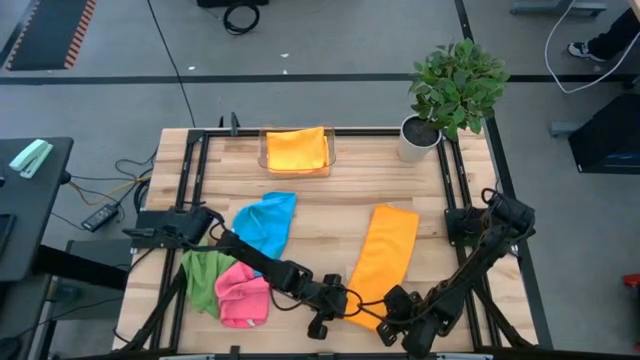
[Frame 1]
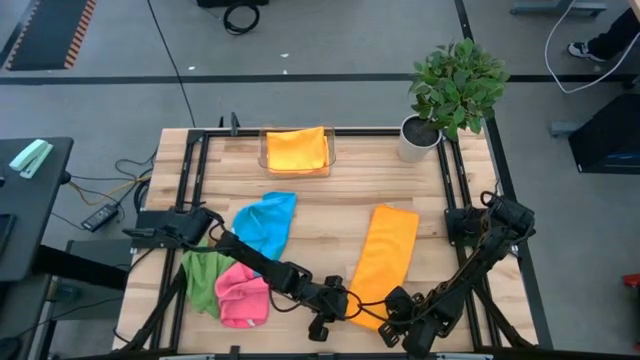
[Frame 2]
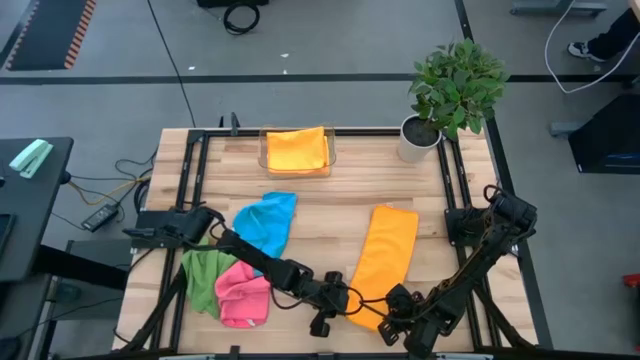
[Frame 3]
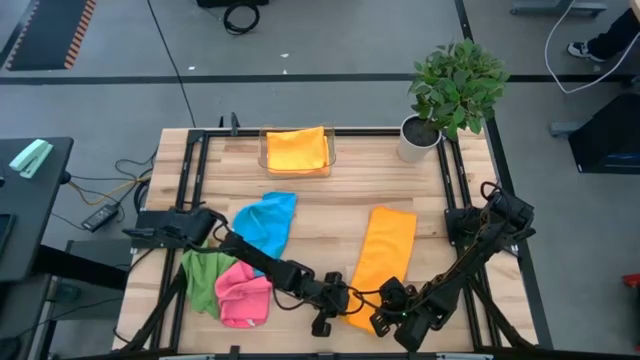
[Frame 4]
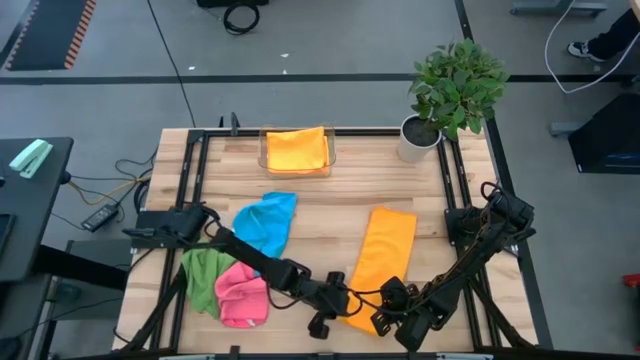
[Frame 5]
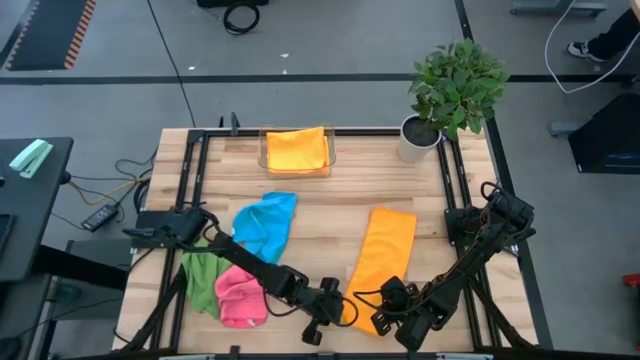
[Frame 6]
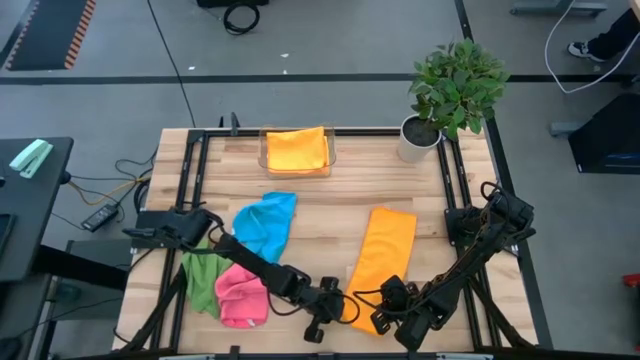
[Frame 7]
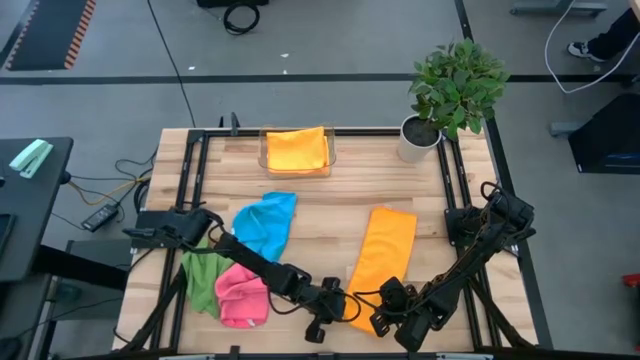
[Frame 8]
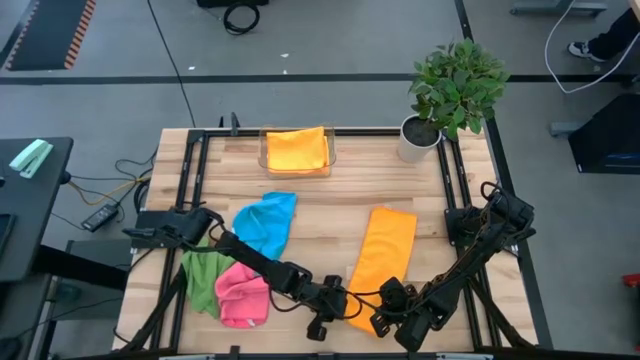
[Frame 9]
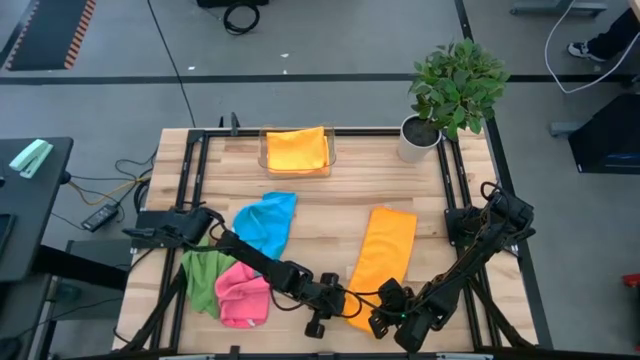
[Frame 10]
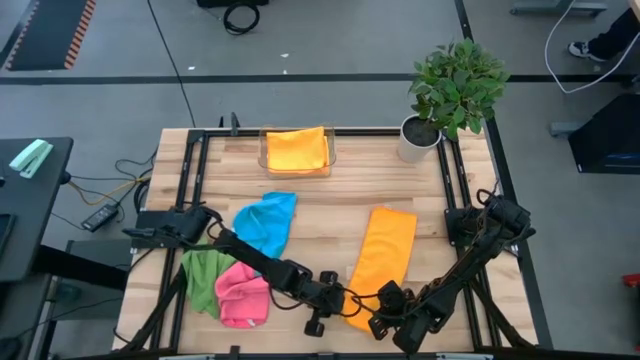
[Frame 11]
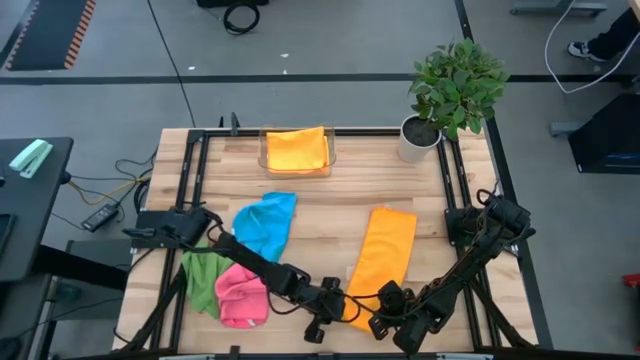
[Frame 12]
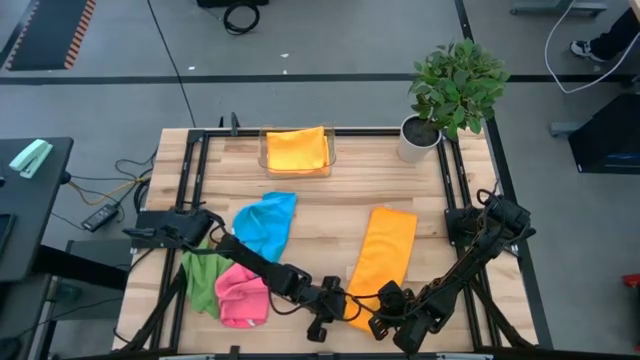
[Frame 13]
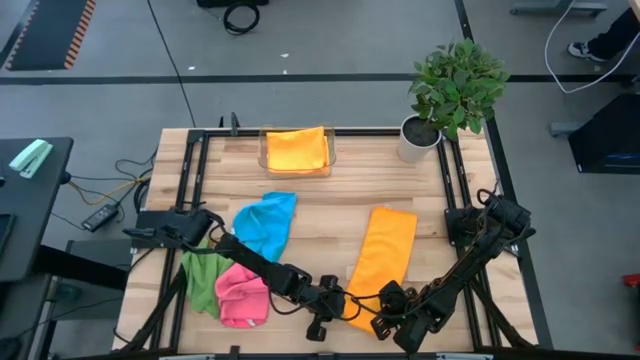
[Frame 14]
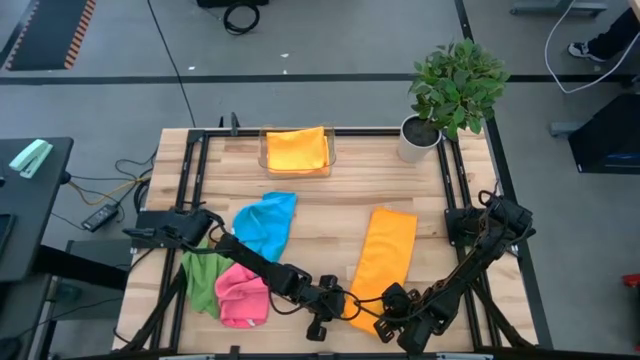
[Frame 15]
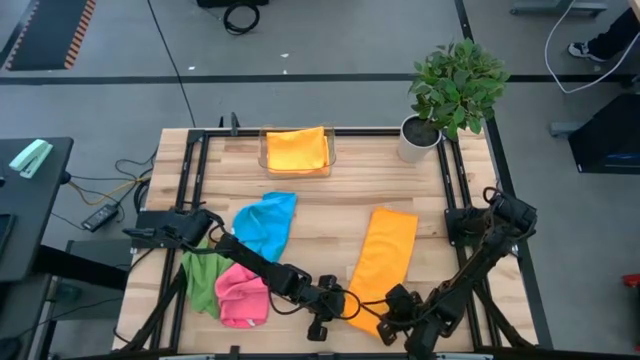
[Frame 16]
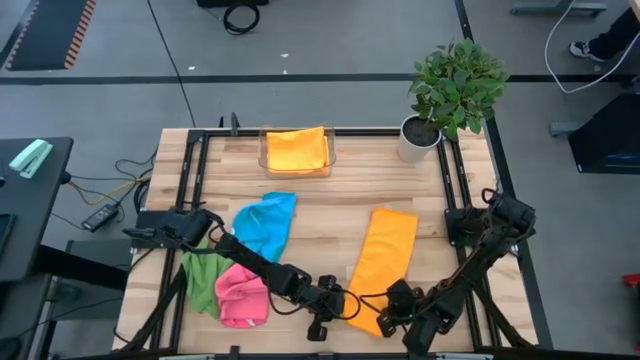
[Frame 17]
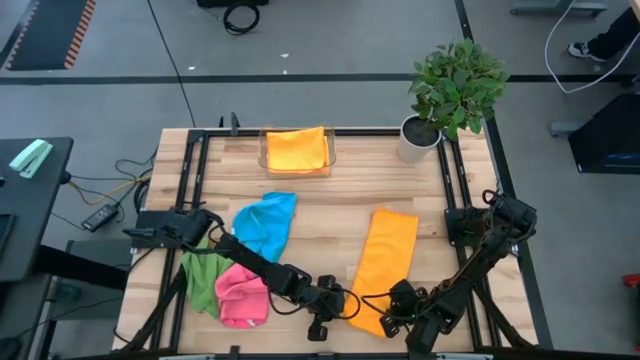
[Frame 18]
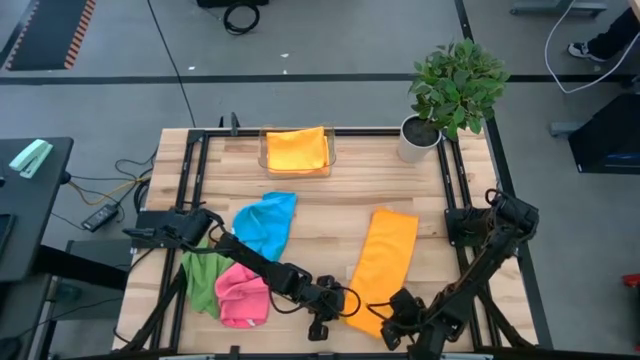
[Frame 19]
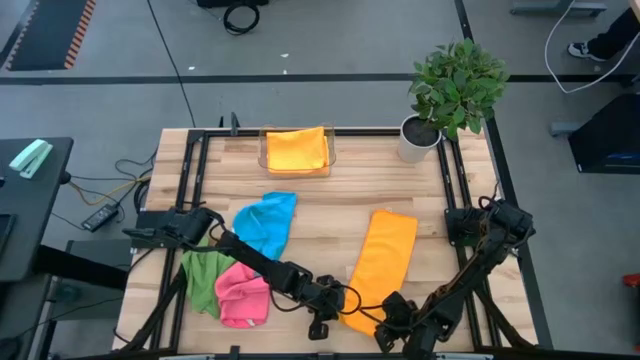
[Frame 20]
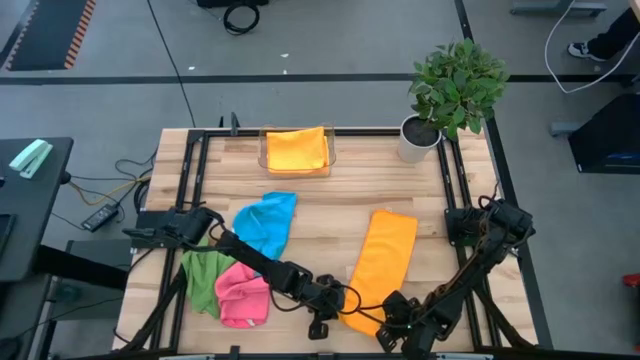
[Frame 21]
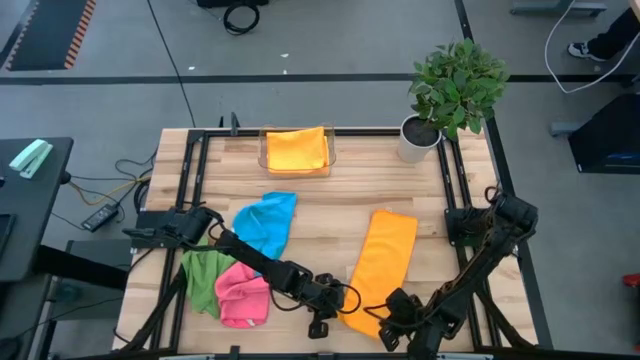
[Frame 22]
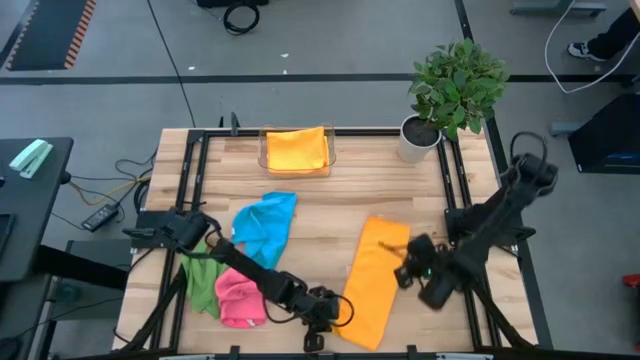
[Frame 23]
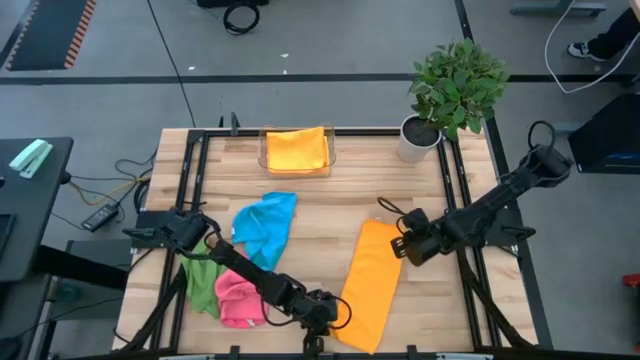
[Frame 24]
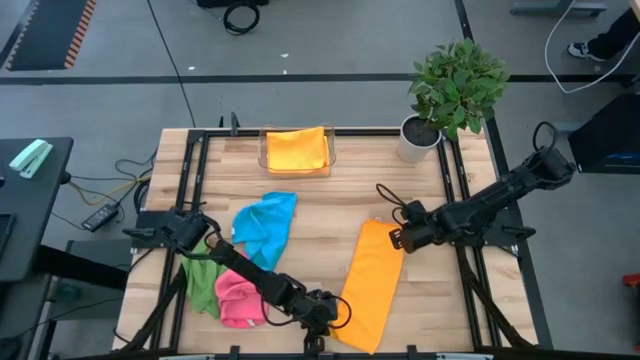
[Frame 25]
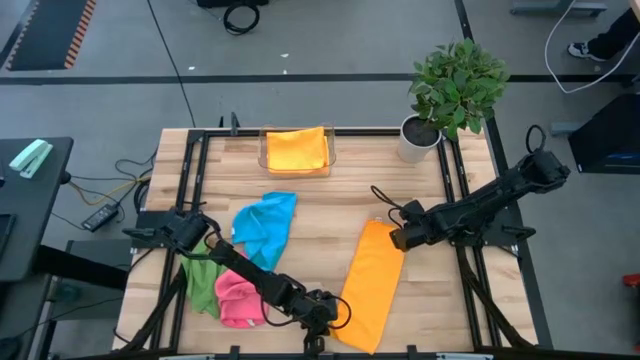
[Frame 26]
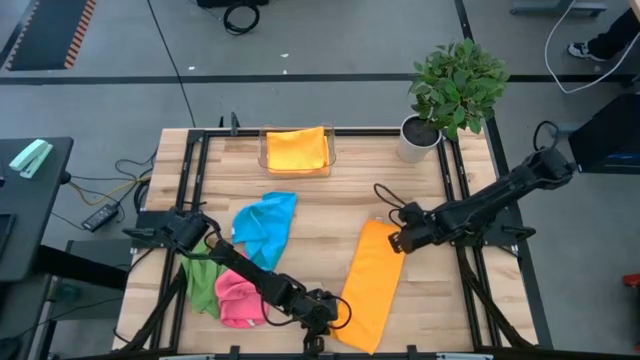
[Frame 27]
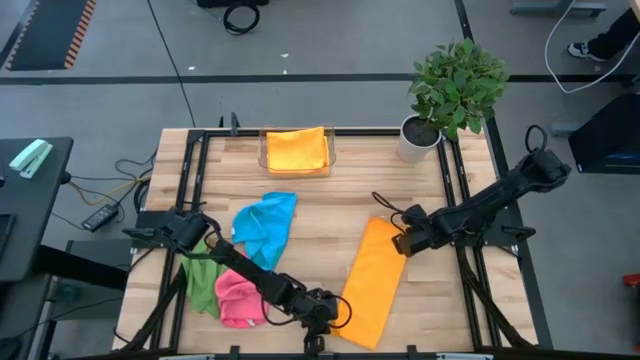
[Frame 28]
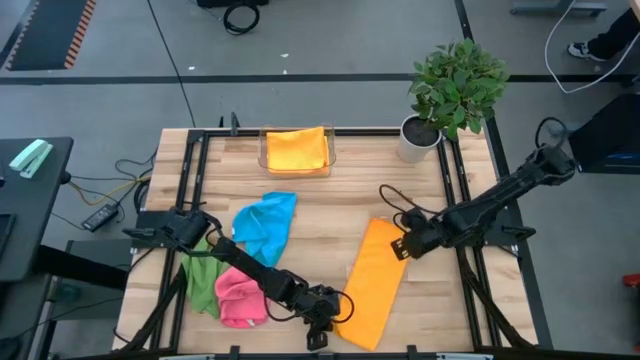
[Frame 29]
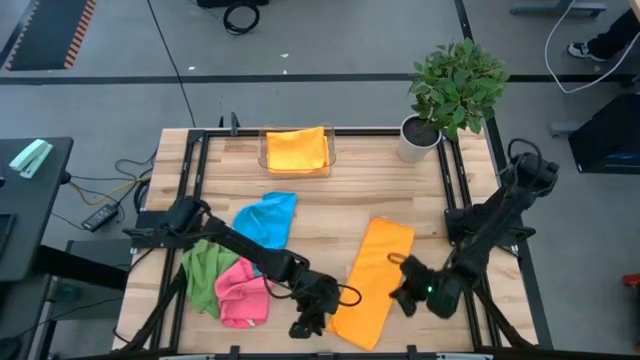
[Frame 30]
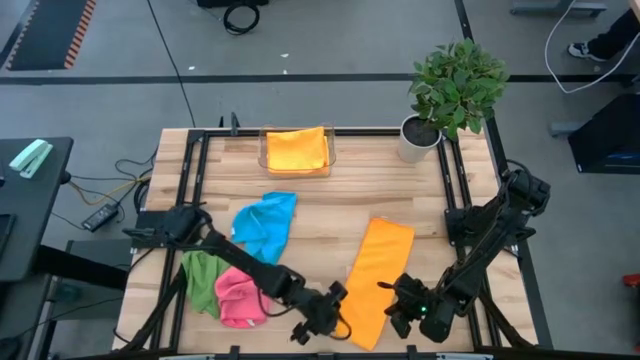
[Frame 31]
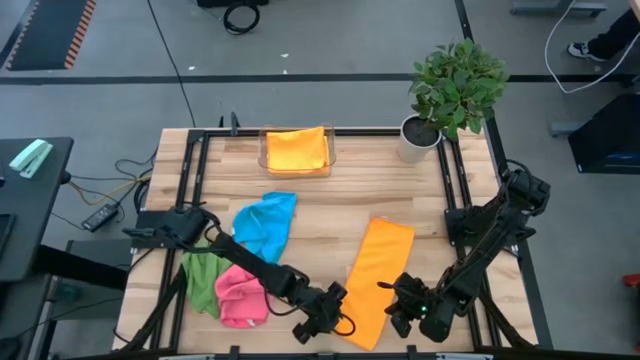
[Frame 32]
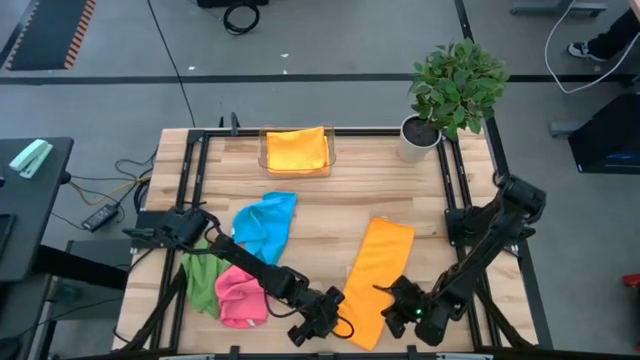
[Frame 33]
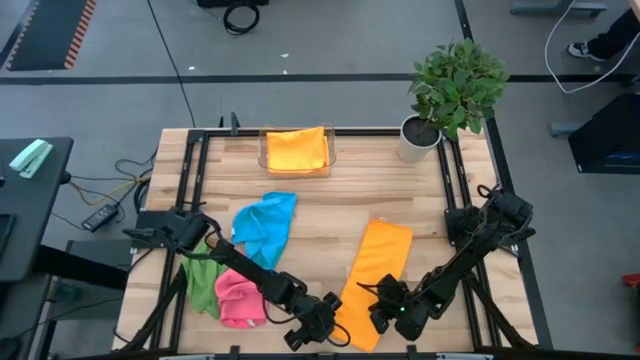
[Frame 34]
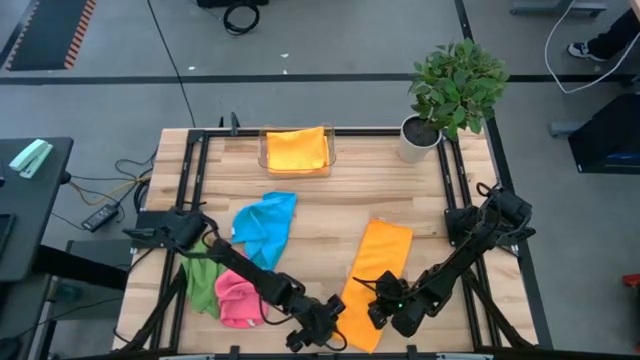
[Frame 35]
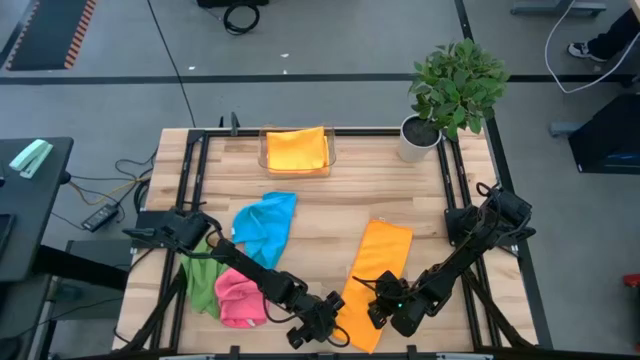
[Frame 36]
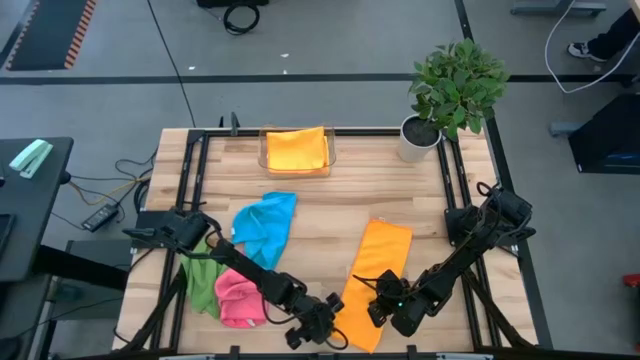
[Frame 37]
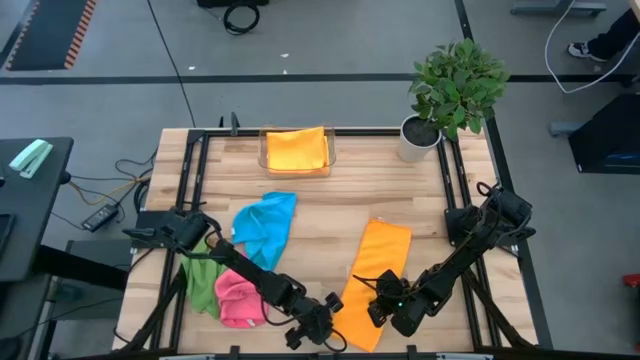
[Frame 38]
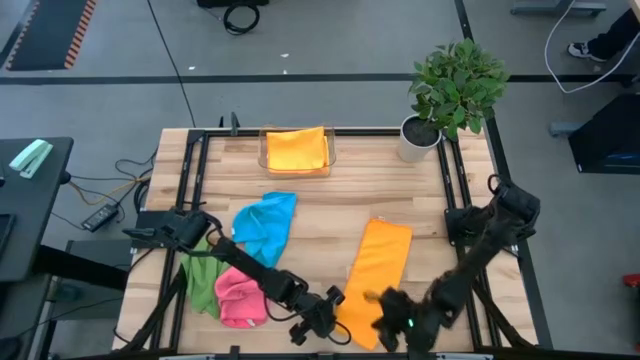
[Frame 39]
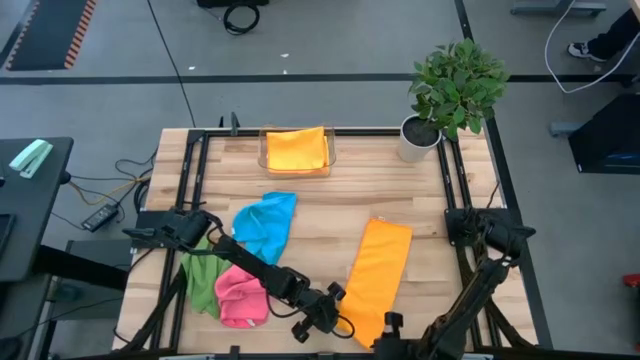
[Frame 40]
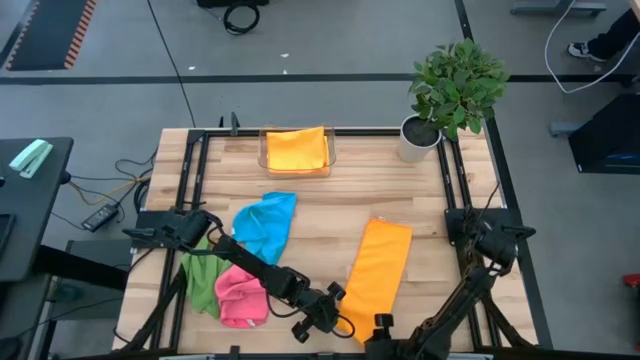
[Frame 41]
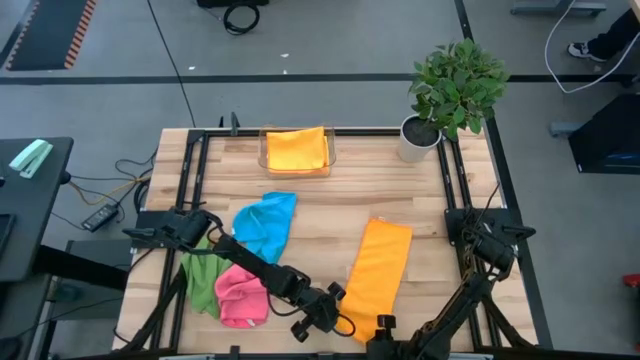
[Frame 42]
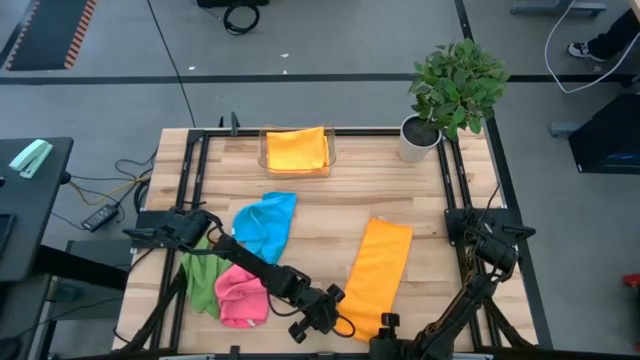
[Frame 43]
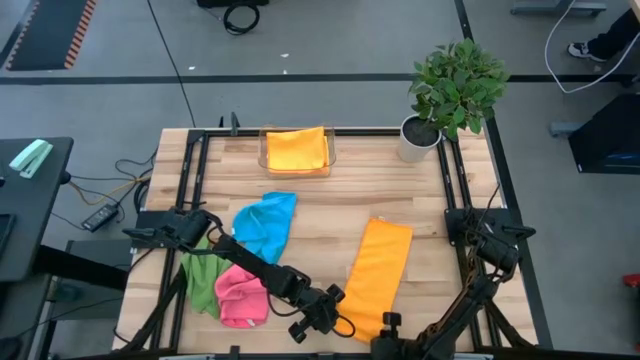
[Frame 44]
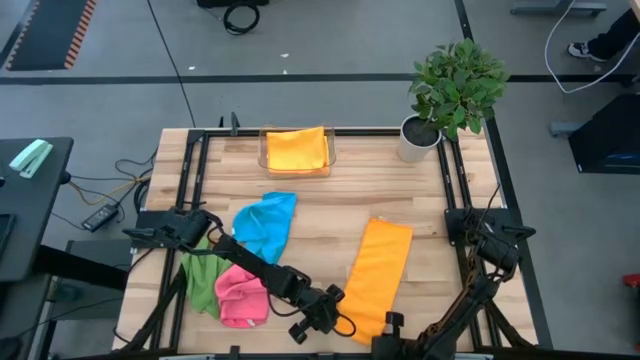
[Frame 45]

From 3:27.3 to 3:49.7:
Task: Fold microfiber towels
Fold the orange microfiber towel
